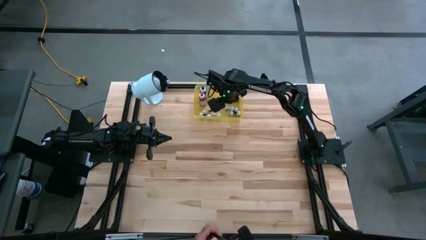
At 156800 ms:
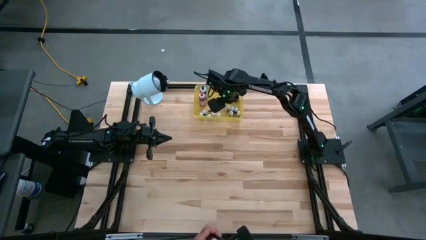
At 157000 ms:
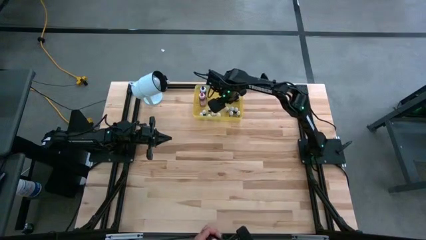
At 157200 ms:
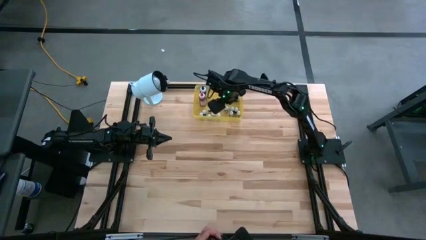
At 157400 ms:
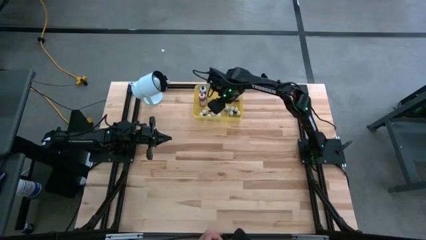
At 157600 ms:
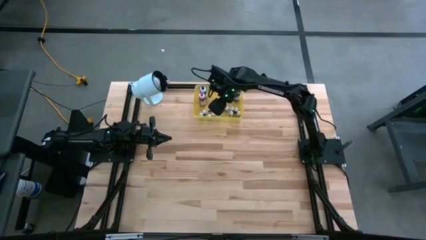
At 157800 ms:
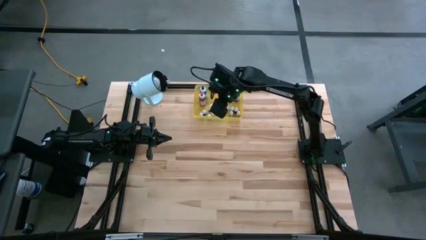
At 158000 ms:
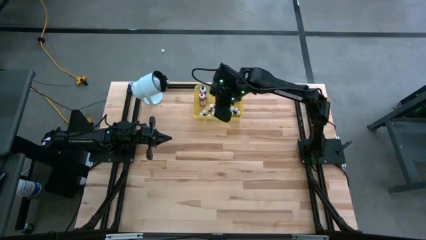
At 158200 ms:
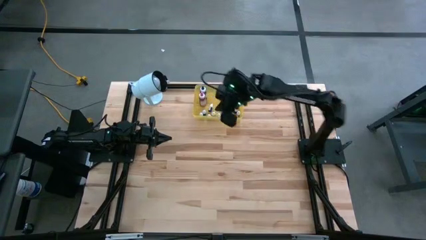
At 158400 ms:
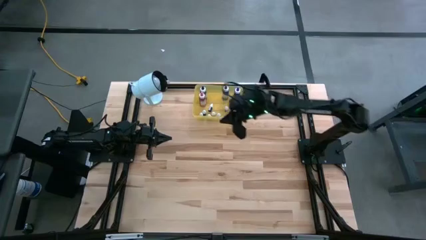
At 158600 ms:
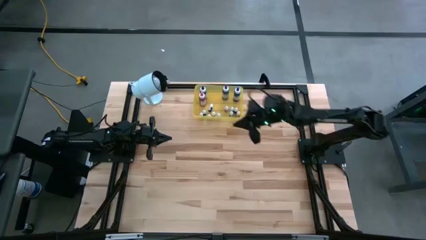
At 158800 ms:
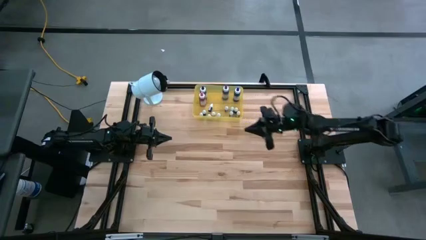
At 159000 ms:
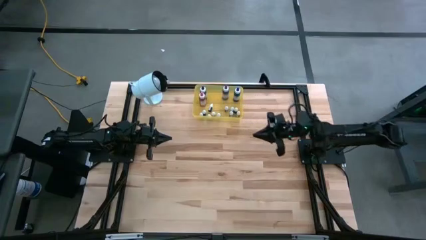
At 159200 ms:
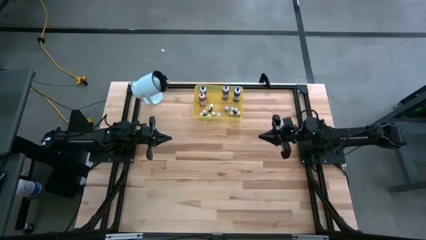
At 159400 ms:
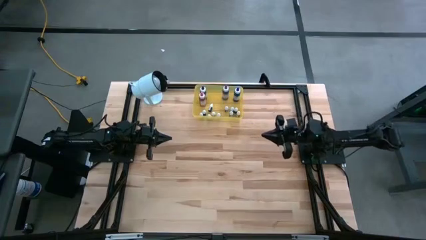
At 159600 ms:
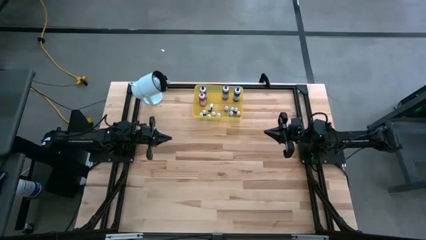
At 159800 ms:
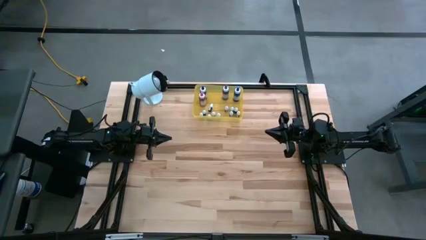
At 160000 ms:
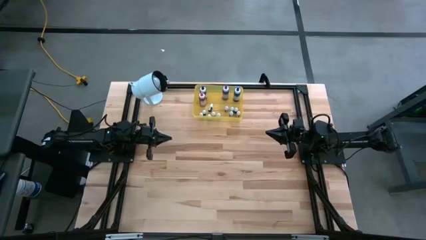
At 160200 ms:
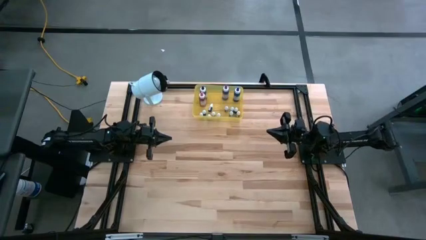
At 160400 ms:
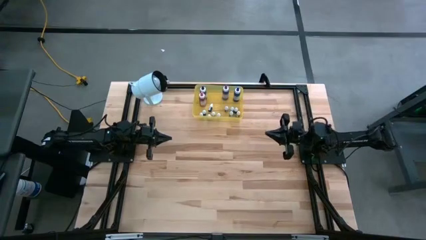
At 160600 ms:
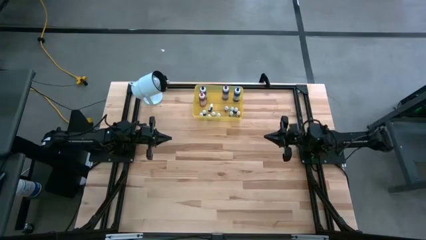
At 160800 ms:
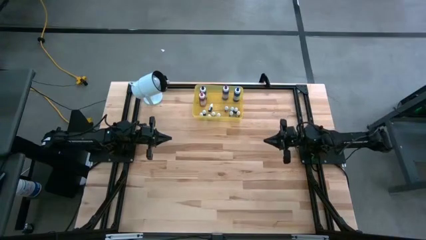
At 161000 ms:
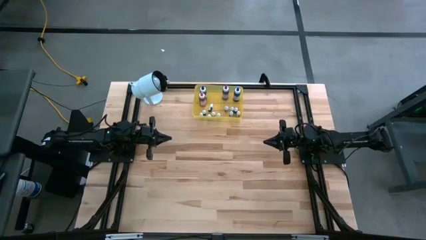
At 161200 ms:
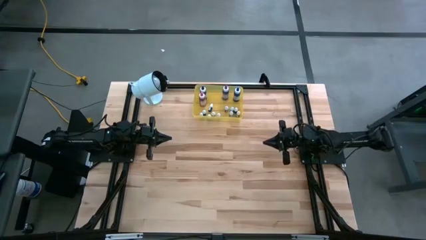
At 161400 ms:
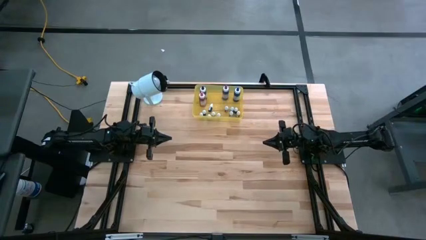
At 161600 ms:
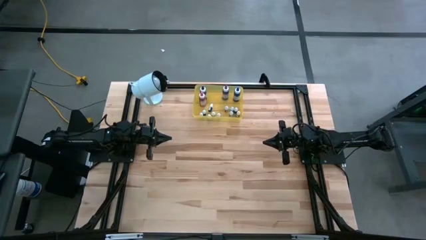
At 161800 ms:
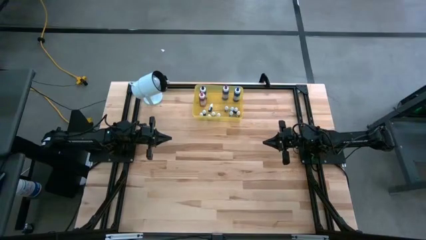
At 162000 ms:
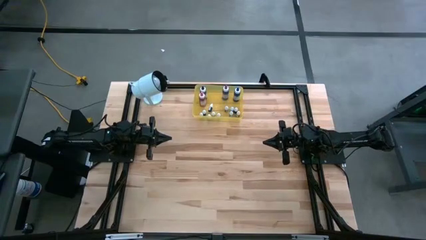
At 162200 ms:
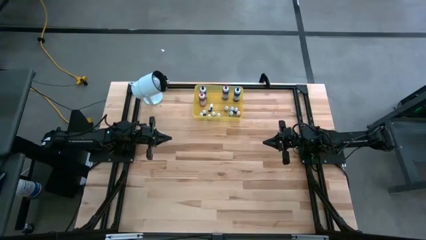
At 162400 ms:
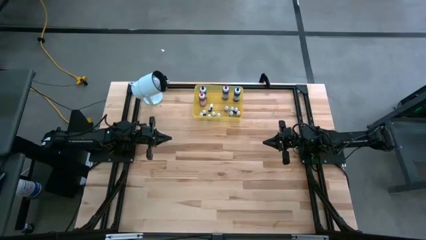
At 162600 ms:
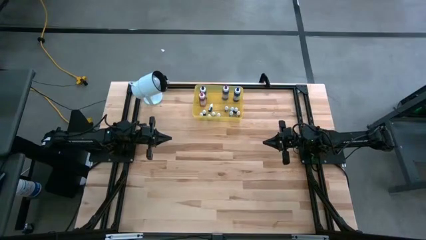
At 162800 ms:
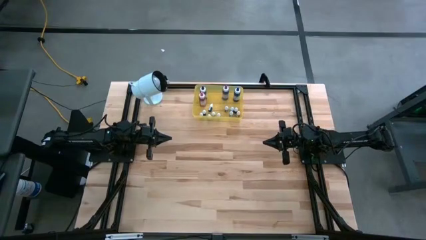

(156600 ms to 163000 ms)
Task: Pick & Place food coloring
Return to Home Position

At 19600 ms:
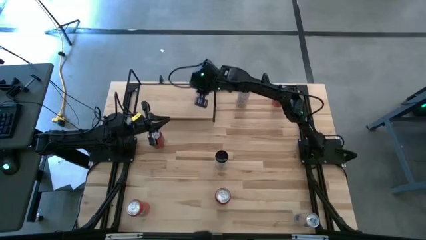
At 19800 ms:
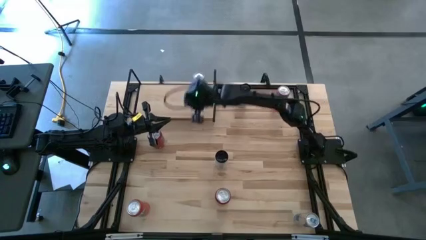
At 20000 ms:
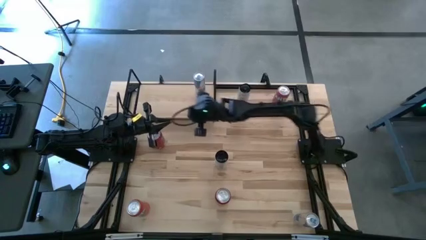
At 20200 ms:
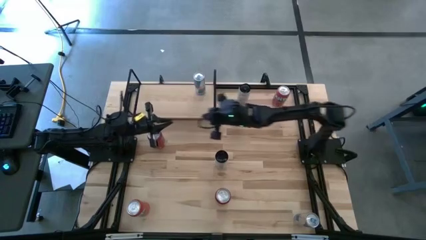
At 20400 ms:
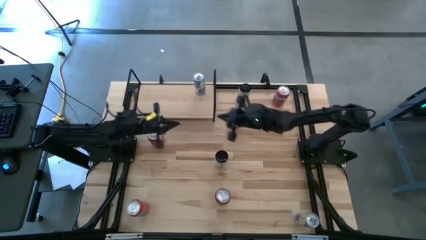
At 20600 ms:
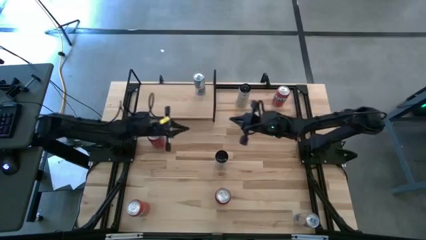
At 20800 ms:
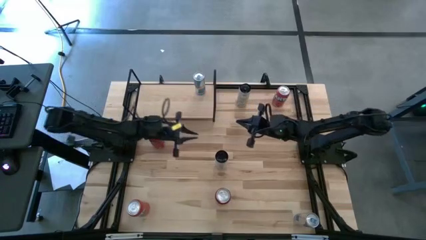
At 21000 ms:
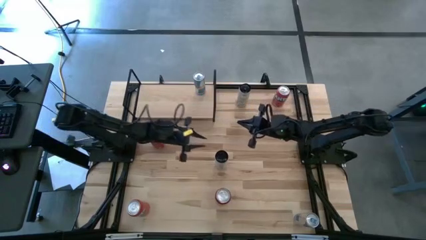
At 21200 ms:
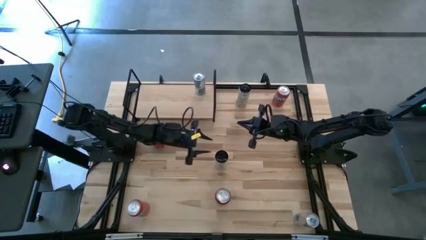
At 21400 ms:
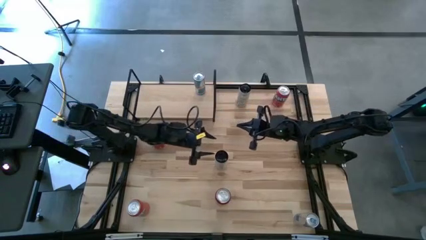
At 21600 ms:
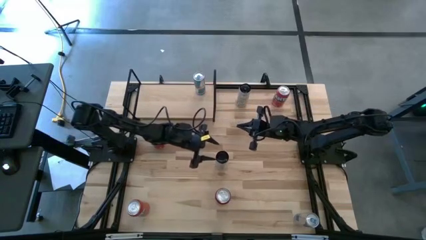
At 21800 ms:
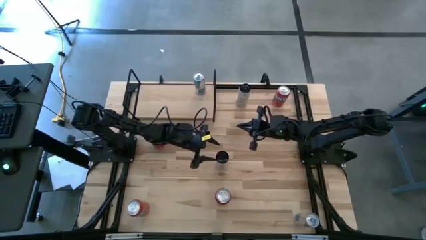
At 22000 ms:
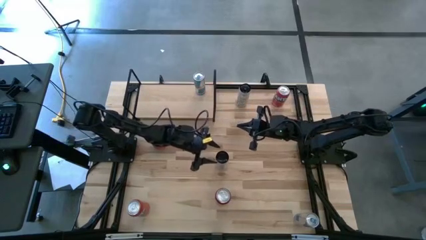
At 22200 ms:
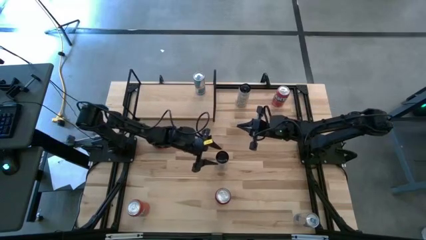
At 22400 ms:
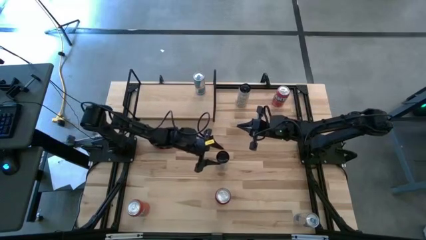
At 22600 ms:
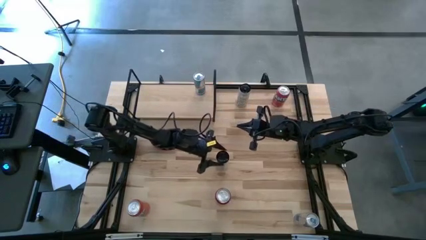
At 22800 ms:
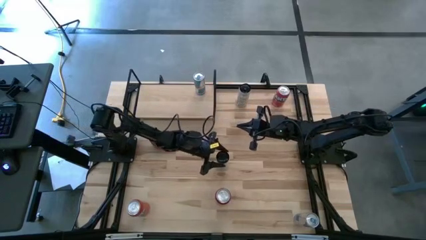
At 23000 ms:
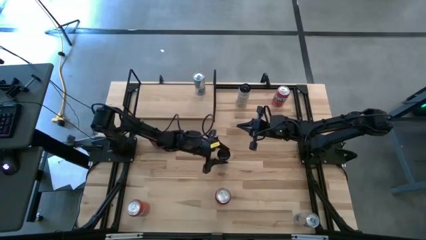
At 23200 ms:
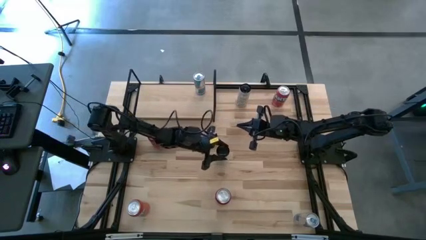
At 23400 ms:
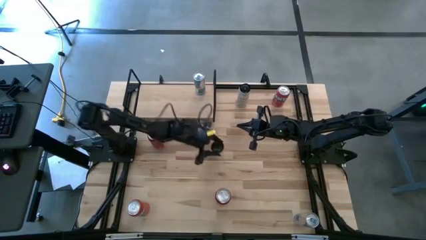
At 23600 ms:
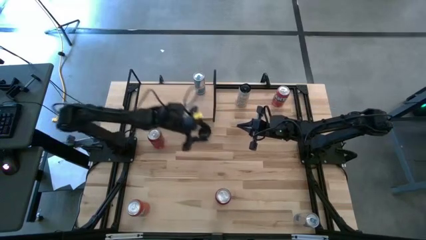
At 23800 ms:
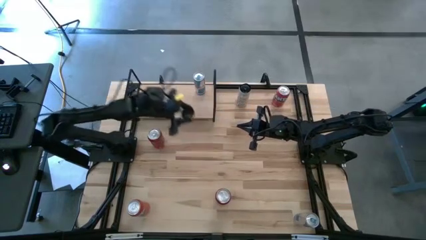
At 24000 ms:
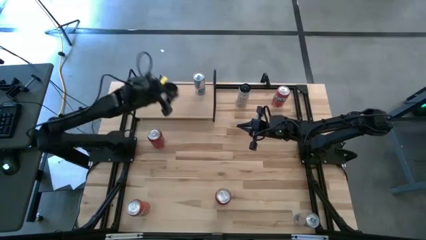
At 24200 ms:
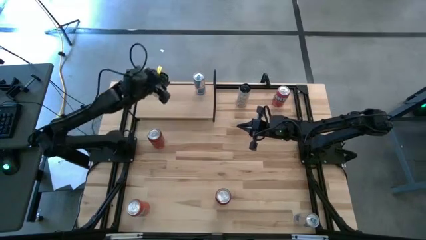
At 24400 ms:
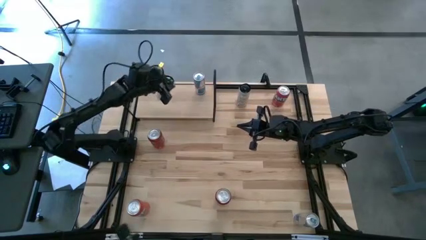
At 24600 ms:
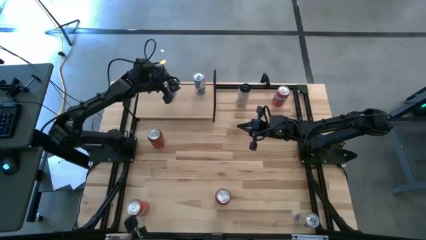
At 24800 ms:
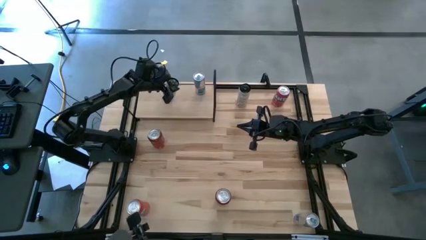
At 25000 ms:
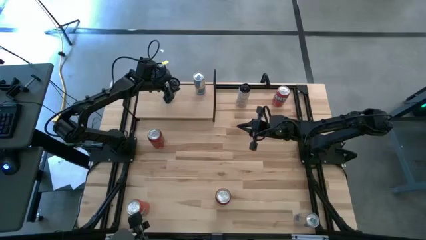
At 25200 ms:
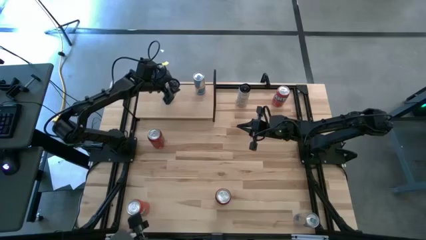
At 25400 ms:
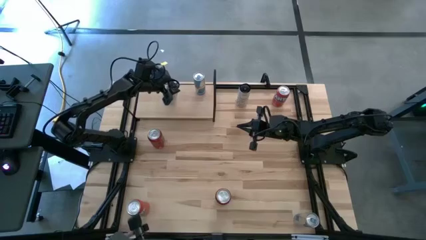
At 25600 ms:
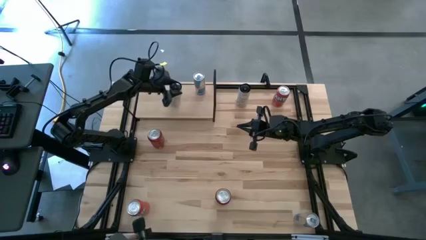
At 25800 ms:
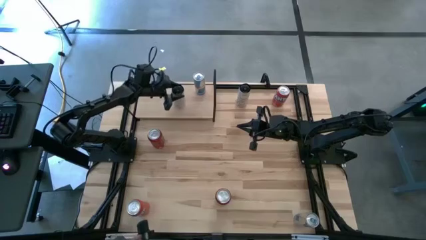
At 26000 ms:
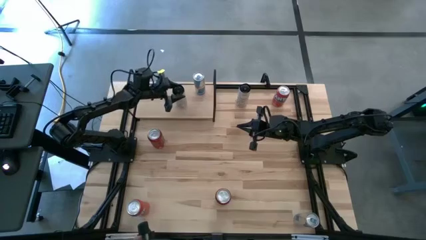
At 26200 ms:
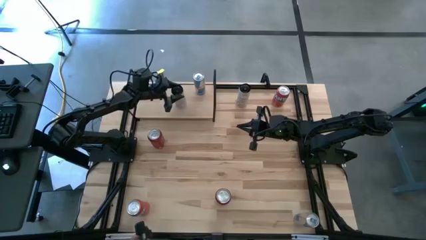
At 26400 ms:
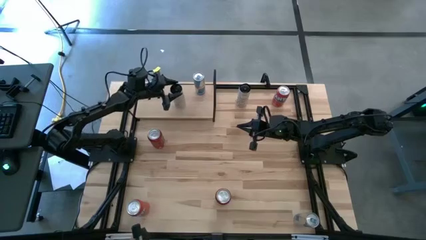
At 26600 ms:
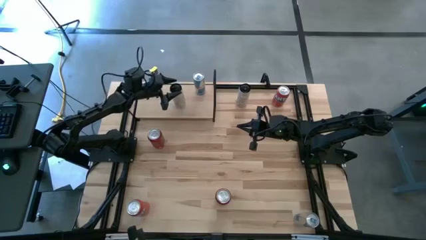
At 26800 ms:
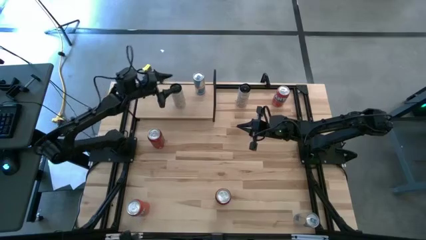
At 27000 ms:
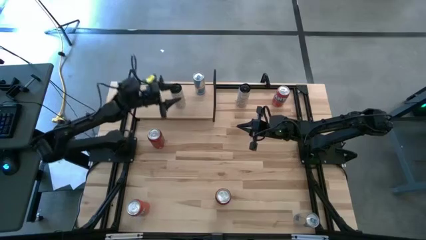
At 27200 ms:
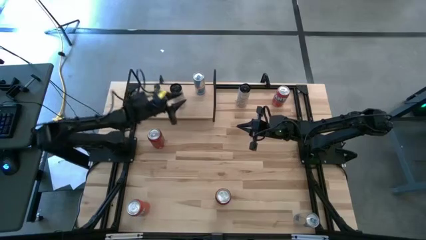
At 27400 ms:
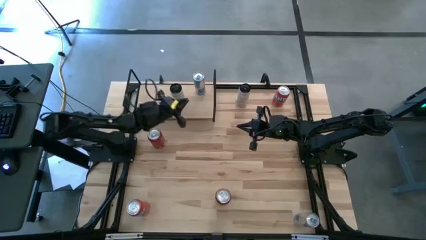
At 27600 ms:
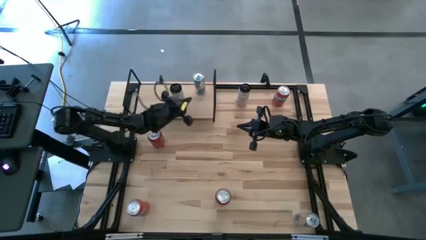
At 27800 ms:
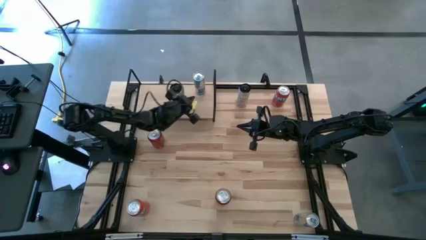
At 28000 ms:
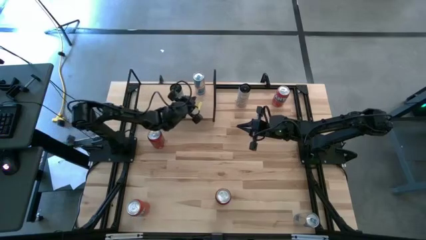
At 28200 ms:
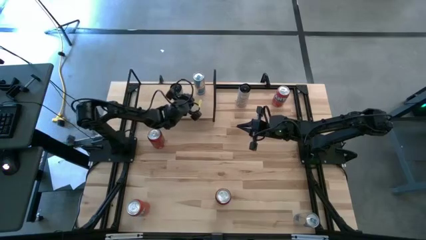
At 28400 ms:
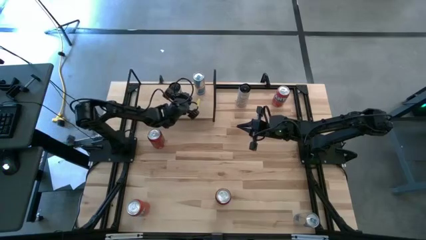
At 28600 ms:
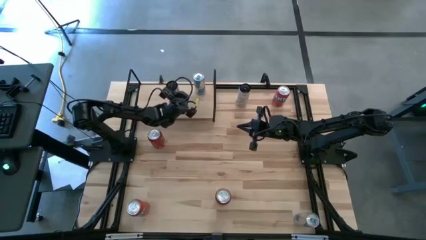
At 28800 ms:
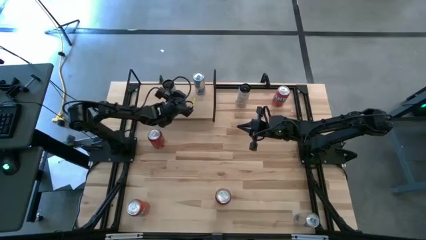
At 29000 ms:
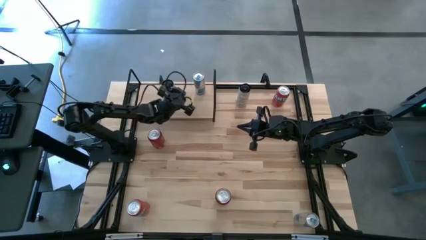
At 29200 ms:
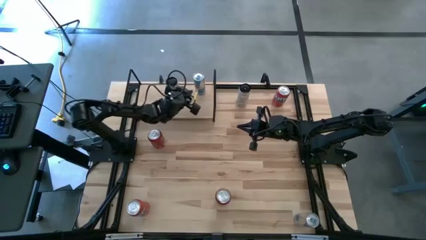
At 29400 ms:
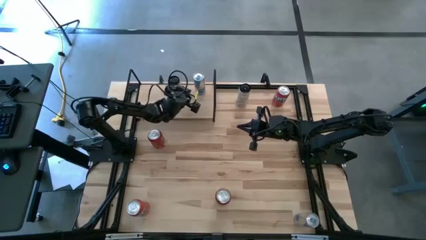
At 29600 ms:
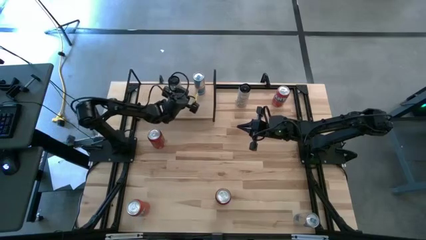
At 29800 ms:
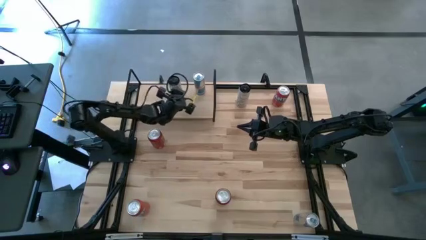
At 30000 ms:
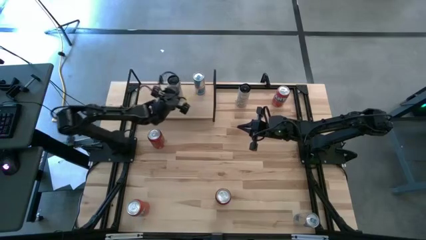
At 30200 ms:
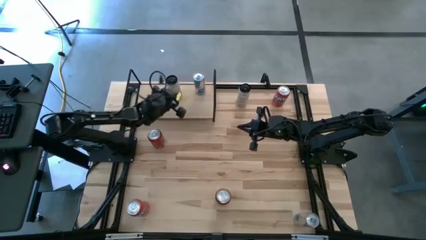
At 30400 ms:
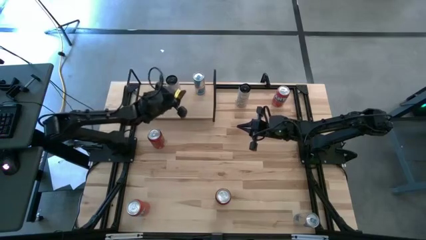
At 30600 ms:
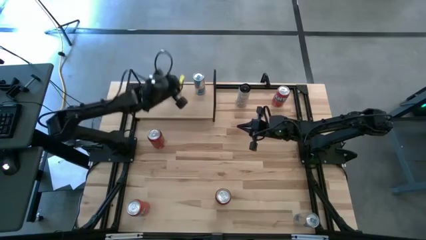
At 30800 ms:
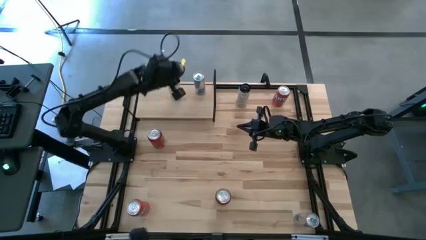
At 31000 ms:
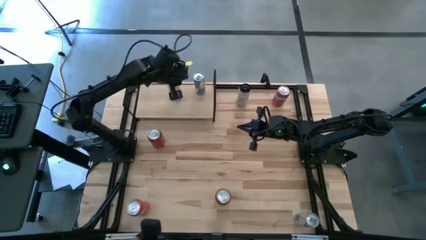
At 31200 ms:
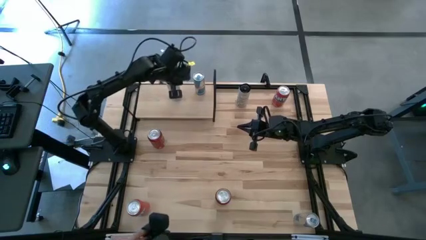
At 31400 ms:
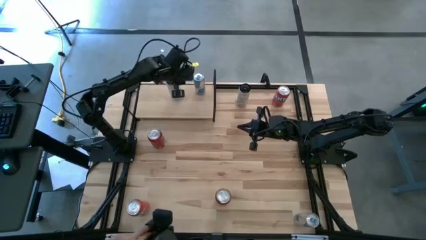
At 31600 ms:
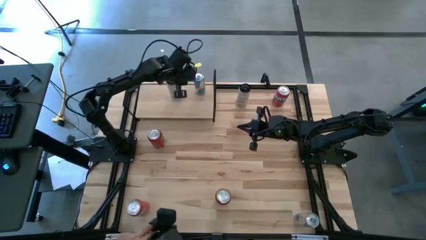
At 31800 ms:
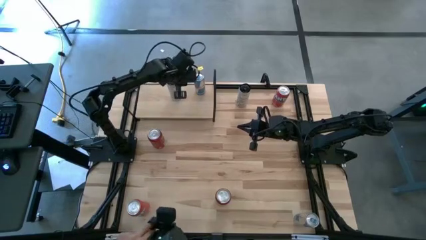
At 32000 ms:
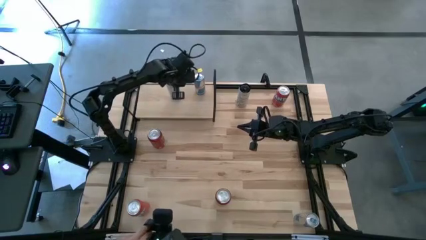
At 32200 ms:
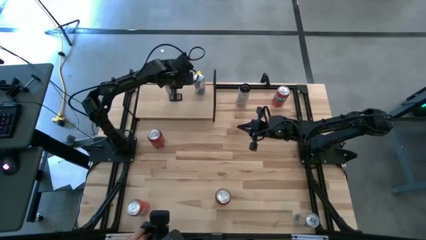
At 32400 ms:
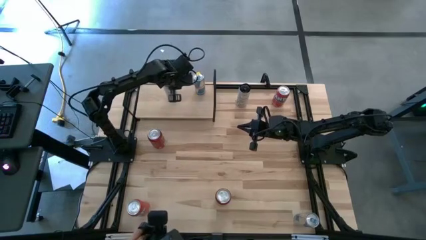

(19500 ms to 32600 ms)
Task: Place canned beverage on shelf
Put the bottom white and yellow soda can on the shelf
